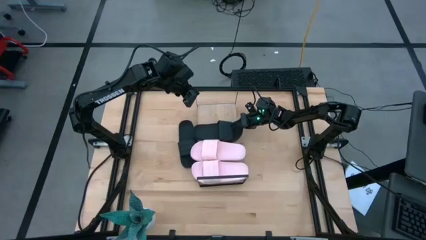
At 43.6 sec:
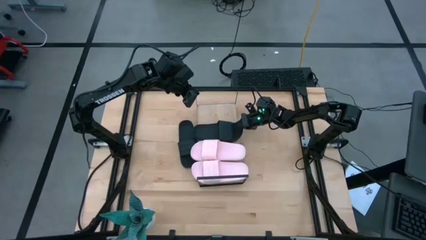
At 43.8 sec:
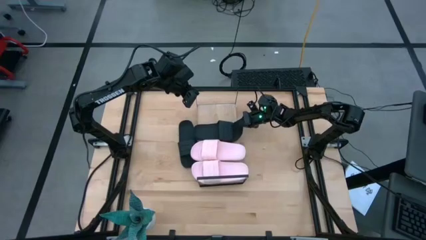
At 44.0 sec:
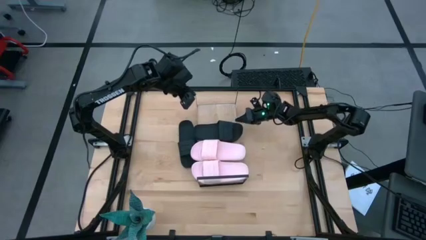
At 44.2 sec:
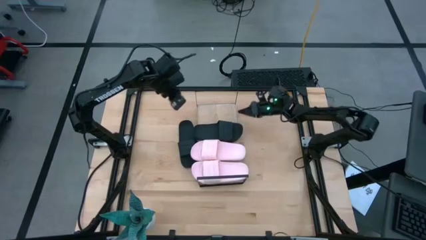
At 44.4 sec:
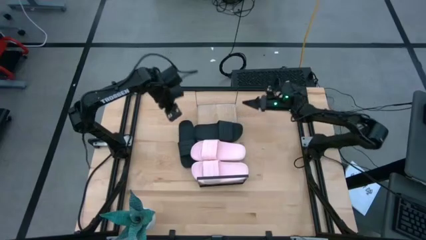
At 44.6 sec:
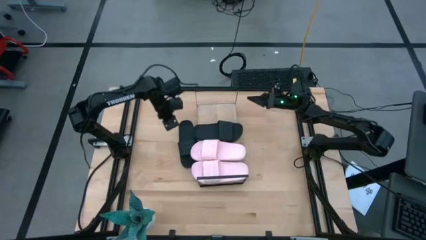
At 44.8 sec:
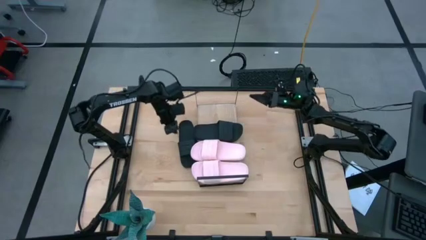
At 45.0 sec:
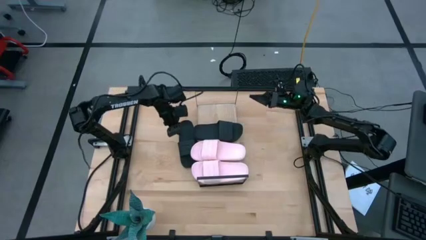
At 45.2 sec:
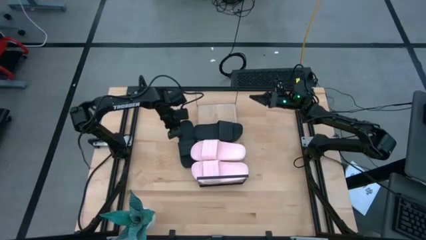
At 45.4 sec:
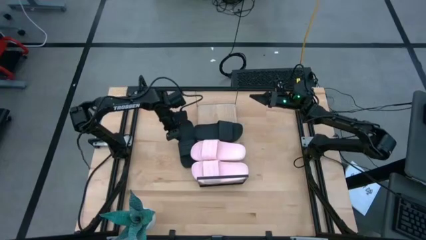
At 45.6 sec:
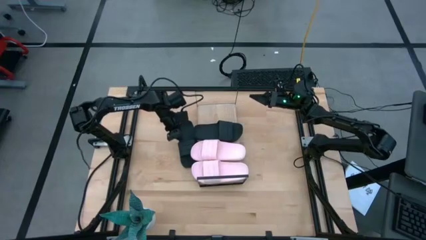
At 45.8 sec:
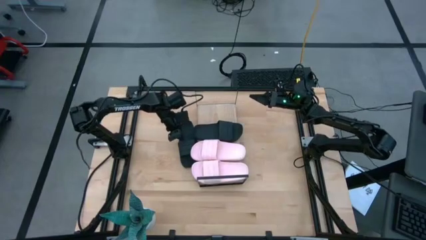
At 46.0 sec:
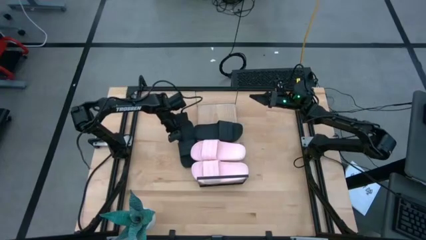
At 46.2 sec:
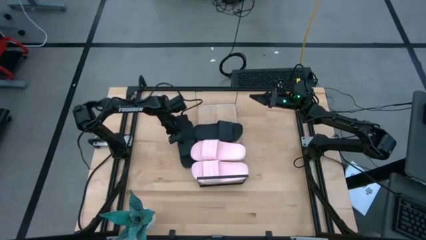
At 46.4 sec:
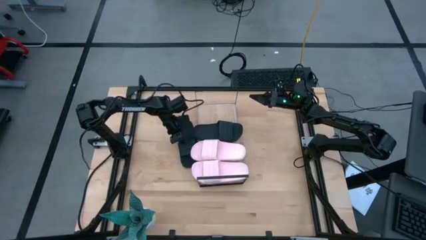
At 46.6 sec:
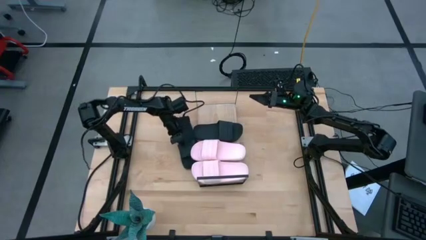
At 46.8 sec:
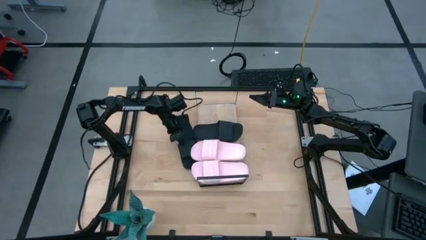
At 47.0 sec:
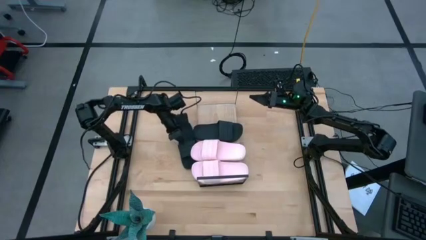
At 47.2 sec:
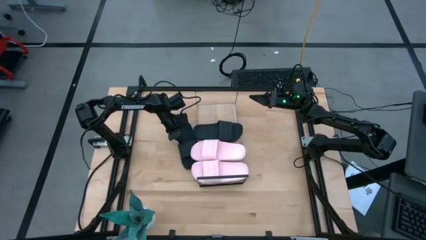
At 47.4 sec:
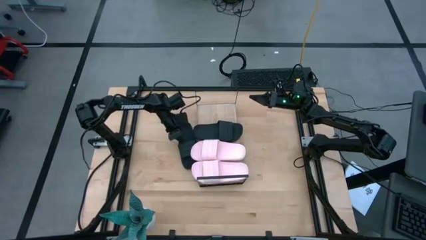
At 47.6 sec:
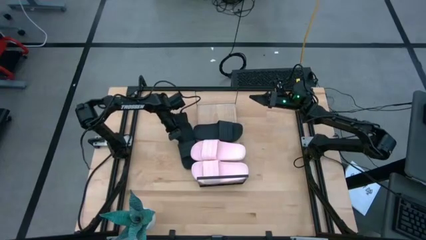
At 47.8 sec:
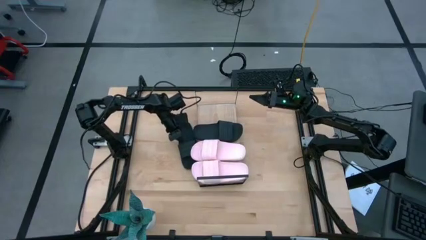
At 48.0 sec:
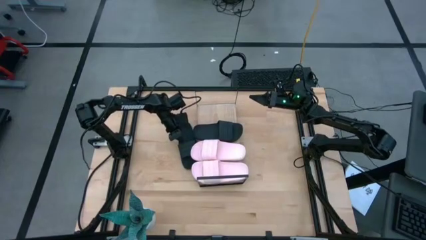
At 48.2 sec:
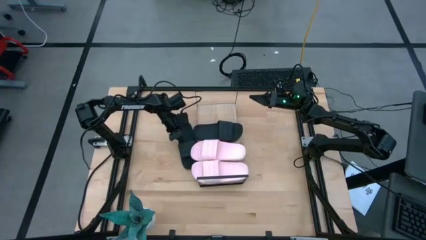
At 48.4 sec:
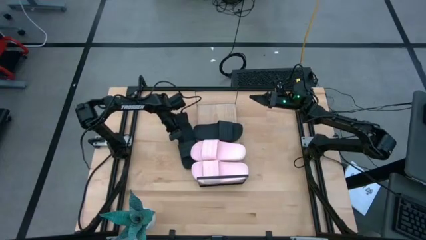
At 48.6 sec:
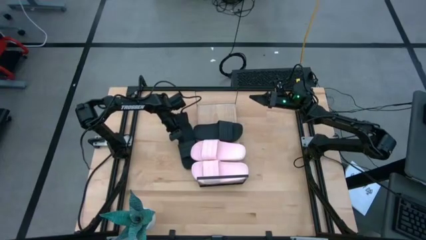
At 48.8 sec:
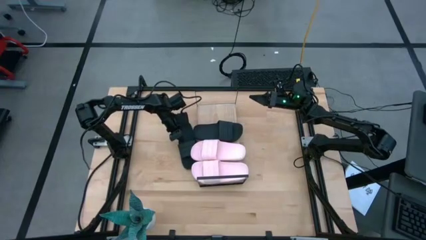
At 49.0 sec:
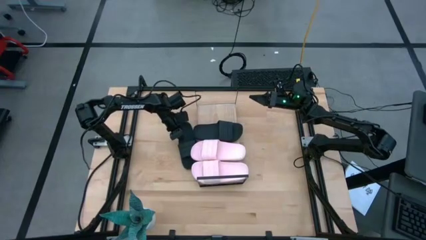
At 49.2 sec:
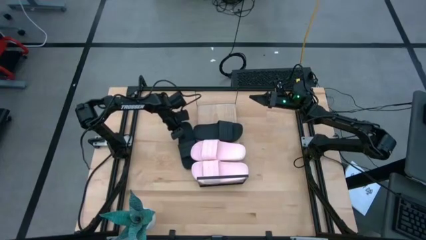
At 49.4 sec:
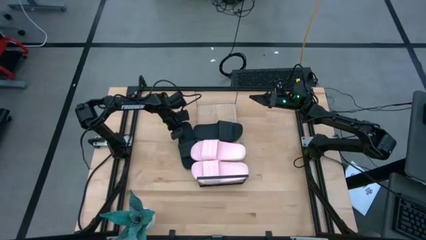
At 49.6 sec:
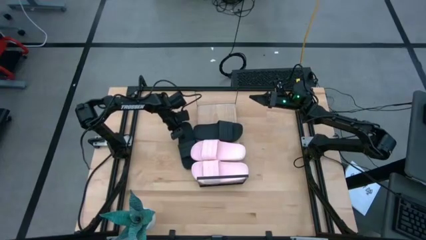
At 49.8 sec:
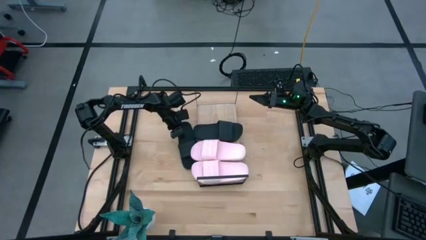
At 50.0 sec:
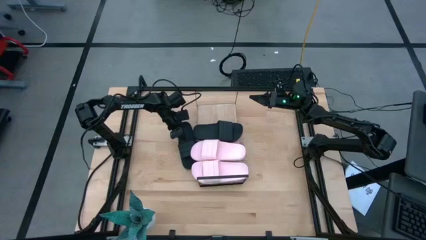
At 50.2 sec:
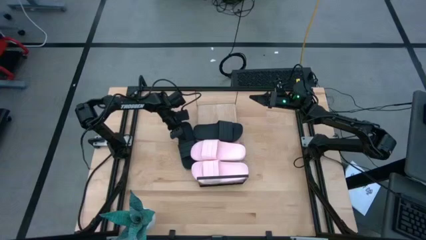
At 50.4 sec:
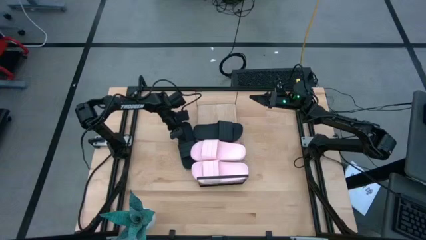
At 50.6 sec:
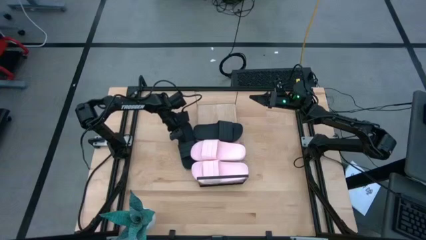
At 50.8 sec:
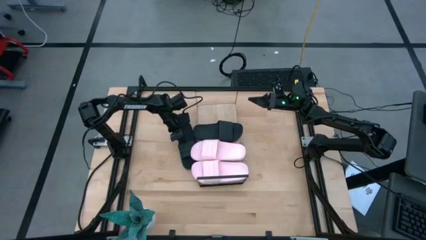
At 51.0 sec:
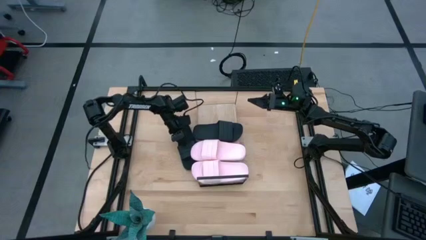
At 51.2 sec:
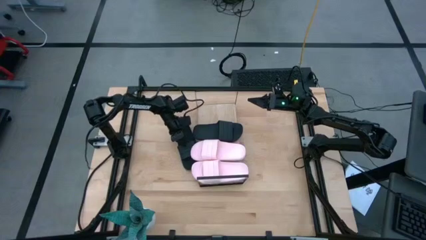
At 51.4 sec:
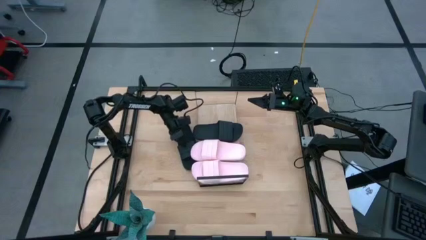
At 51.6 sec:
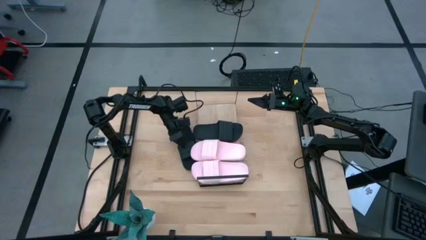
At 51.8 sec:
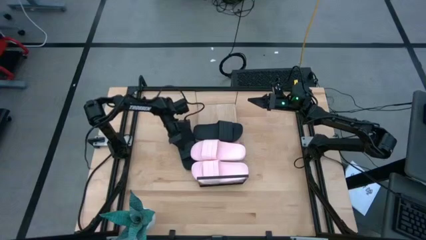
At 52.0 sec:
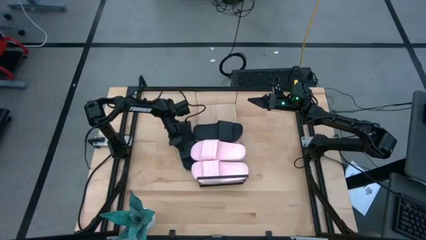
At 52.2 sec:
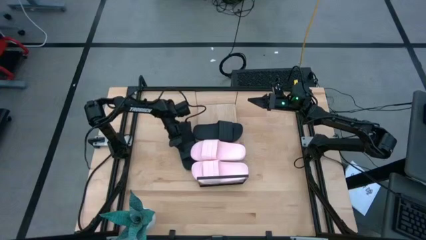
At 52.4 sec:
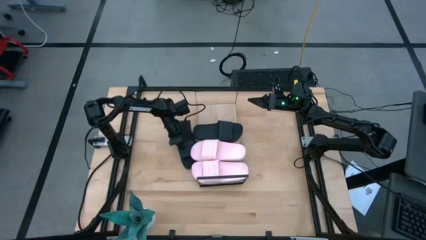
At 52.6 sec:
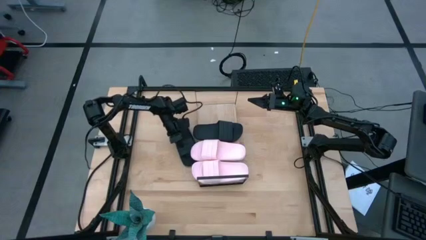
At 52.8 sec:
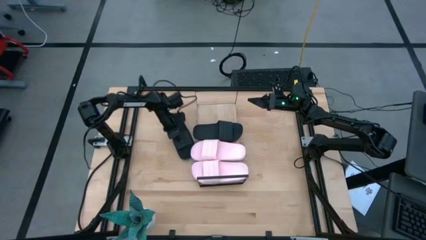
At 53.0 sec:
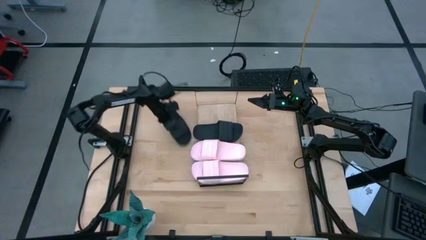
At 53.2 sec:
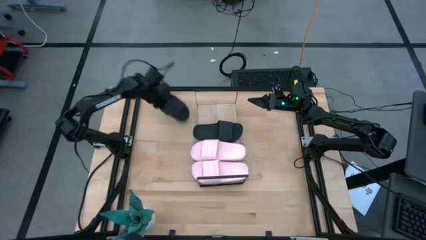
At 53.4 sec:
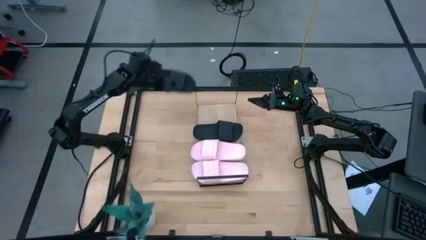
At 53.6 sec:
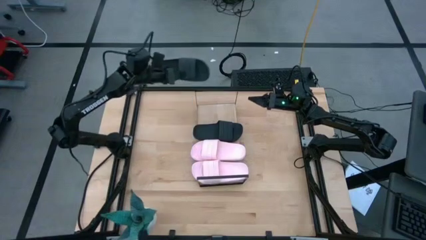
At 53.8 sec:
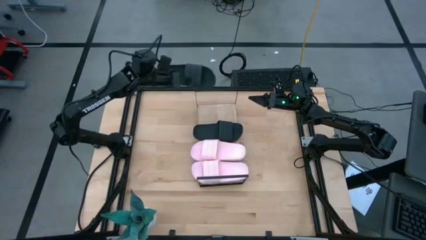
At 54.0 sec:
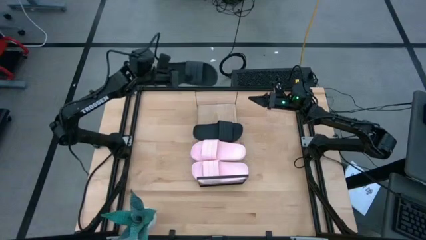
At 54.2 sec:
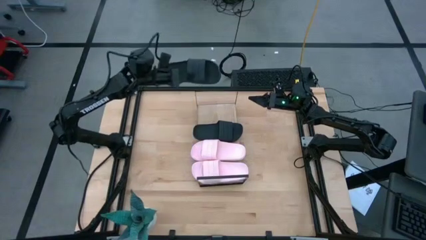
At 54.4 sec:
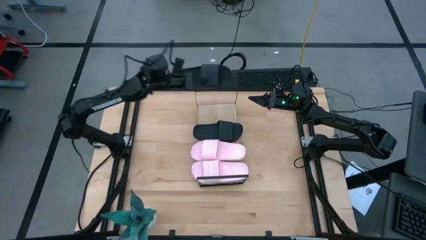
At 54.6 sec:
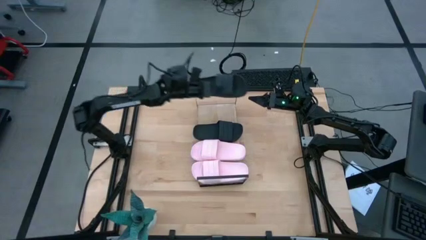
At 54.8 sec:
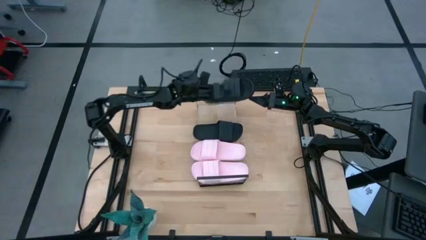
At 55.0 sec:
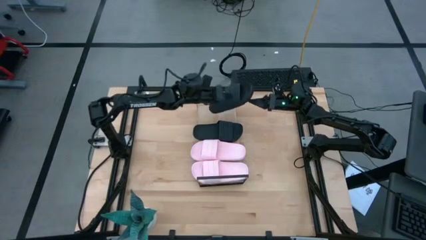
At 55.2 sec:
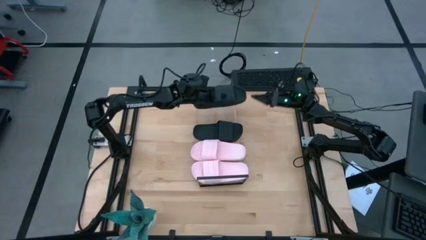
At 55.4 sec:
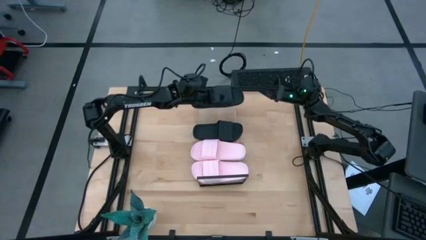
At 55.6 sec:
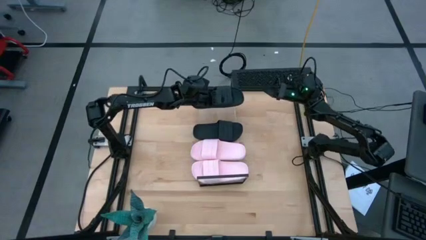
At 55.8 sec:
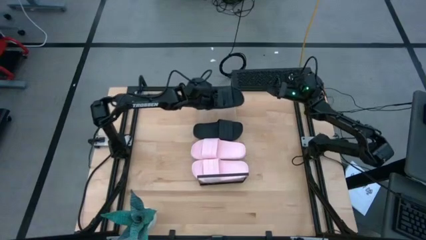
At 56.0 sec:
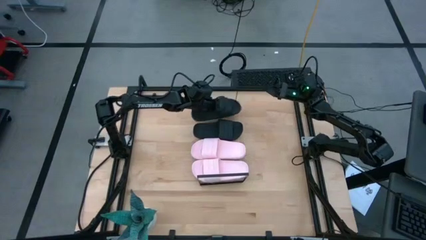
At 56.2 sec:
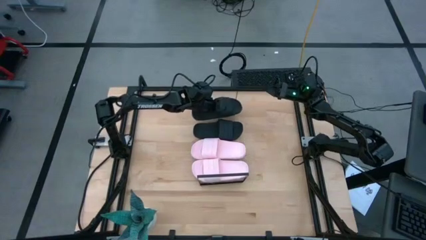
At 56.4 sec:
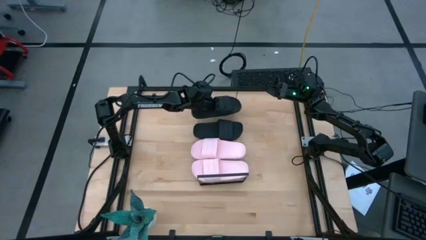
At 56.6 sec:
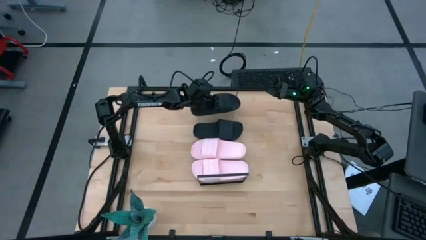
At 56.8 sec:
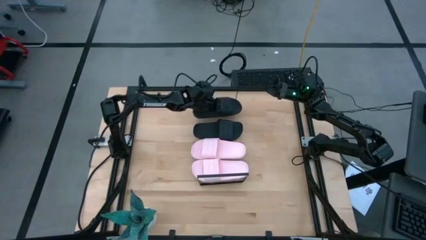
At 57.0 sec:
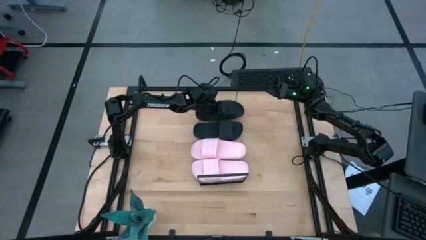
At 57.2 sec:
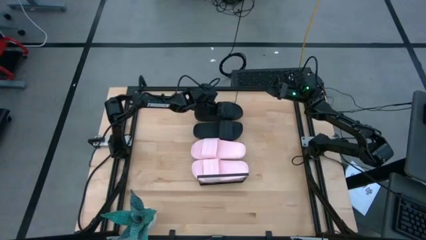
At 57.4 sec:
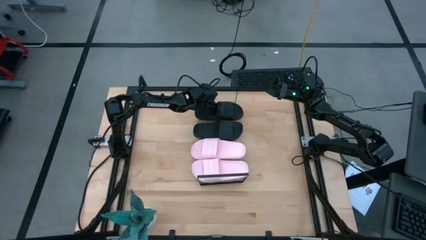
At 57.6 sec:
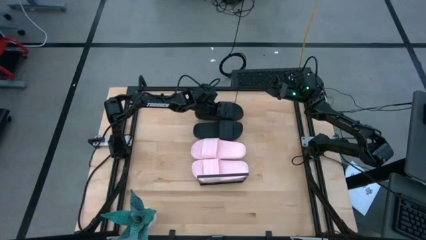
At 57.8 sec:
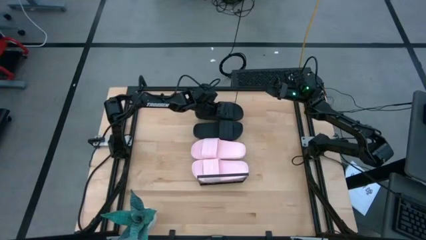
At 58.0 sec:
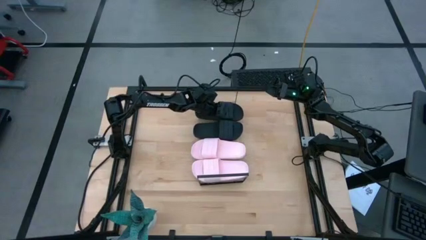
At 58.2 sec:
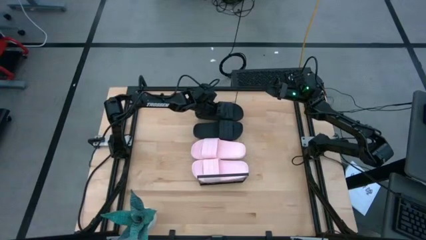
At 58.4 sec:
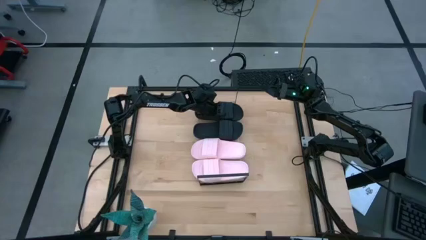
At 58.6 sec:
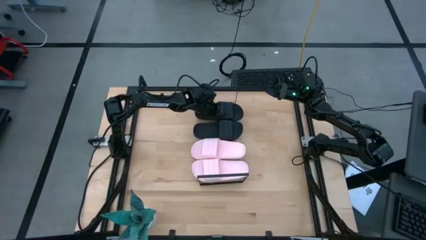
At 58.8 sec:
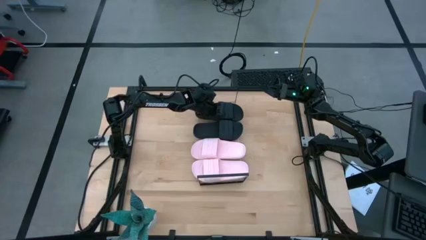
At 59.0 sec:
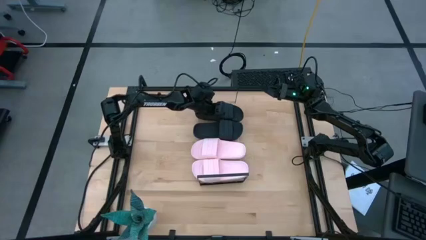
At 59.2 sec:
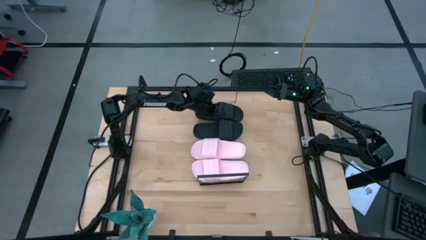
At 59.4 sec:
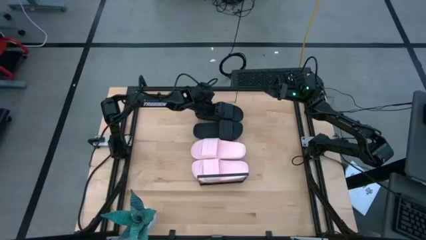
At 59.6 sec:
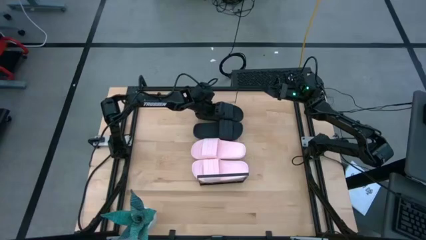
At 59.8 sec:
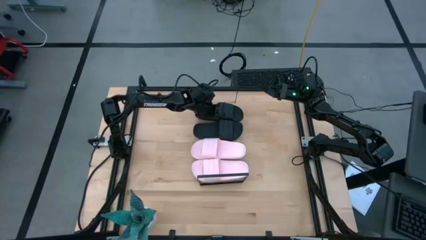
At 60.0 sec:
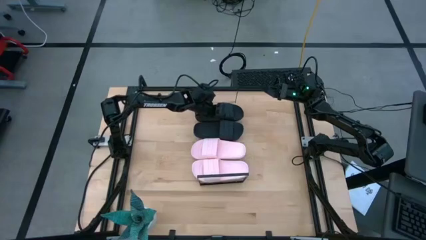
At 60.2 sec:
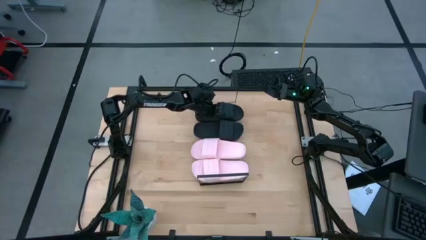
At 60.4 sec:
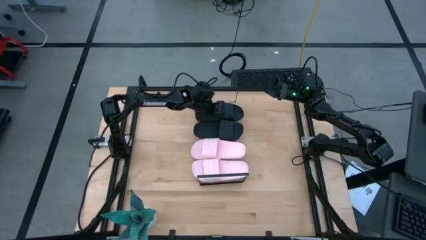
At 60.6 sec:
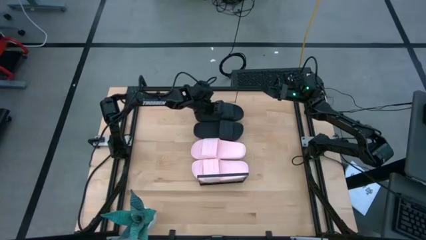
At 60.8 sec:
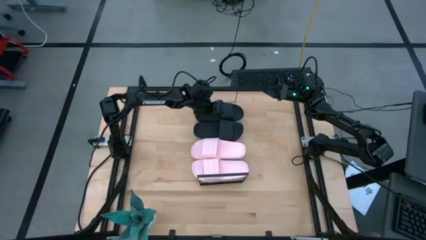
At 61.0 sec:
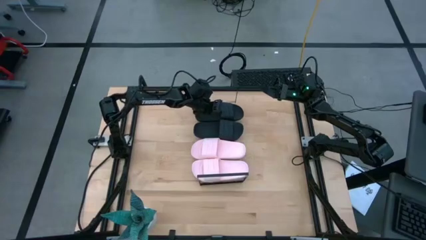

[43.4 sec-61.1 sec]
Task: Pick and place slides into the shelf
Put the black slipper on the shelf
